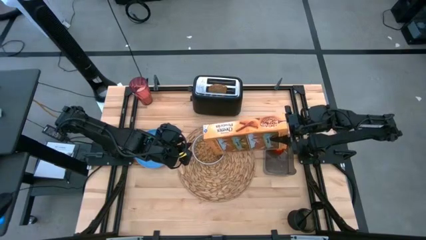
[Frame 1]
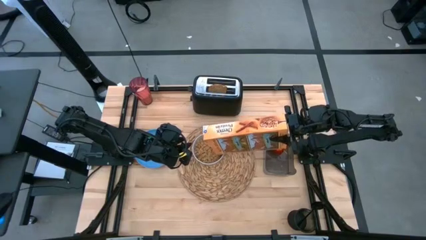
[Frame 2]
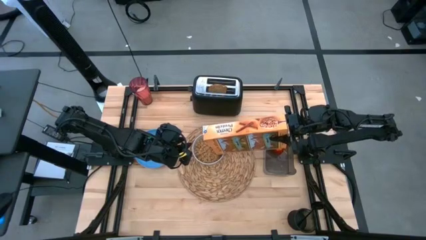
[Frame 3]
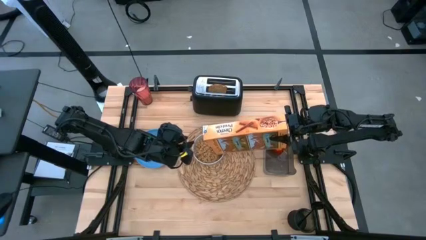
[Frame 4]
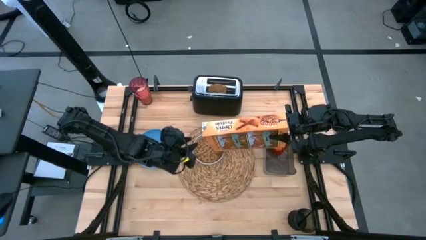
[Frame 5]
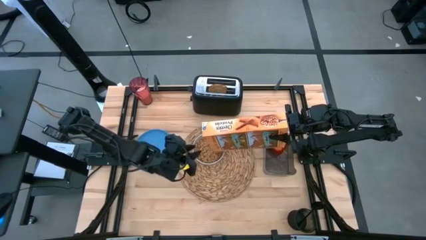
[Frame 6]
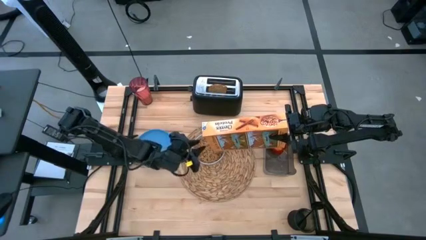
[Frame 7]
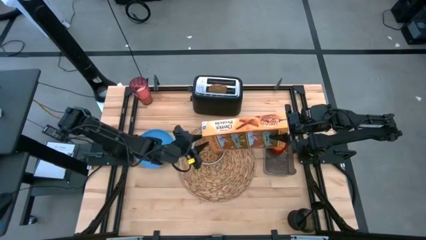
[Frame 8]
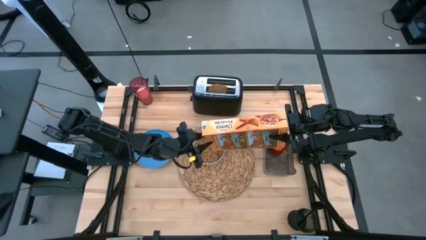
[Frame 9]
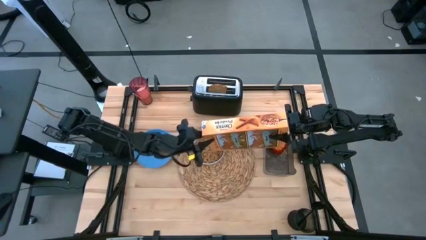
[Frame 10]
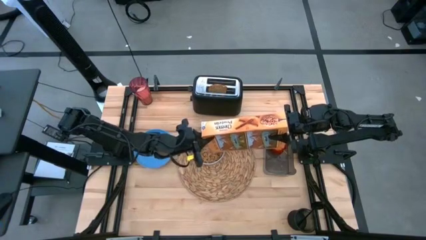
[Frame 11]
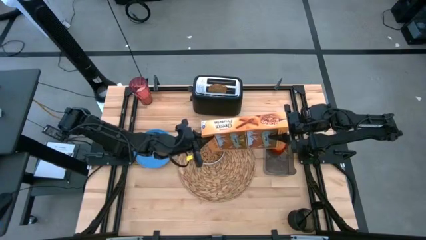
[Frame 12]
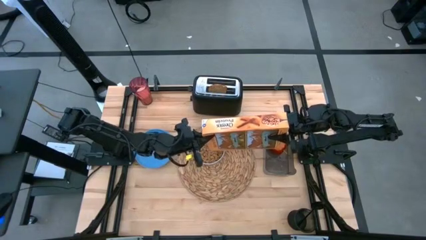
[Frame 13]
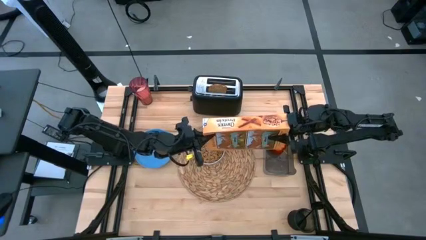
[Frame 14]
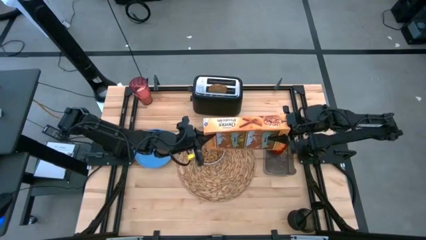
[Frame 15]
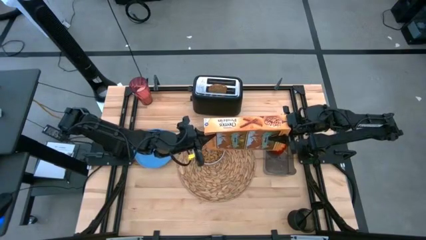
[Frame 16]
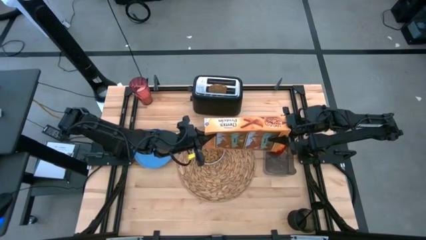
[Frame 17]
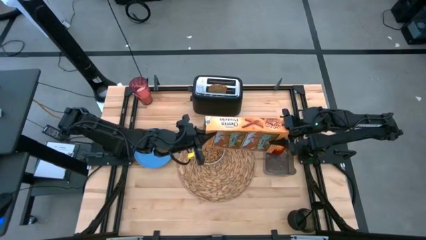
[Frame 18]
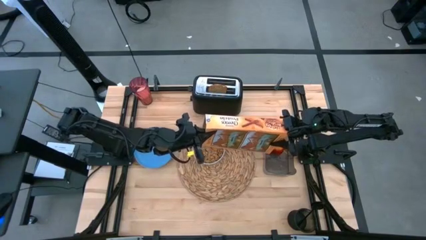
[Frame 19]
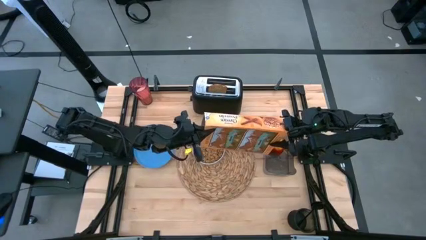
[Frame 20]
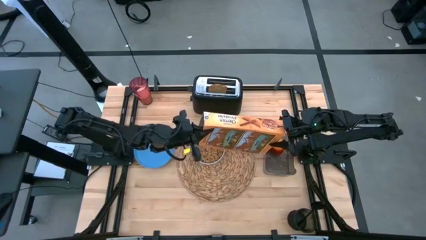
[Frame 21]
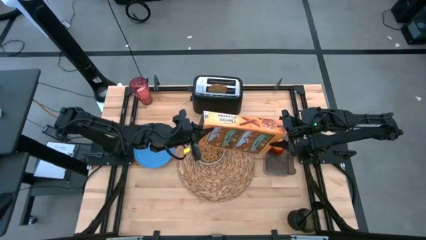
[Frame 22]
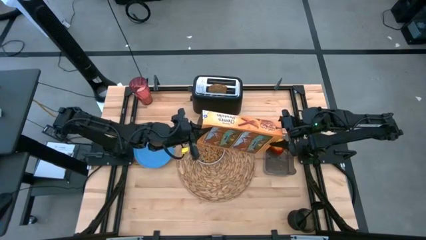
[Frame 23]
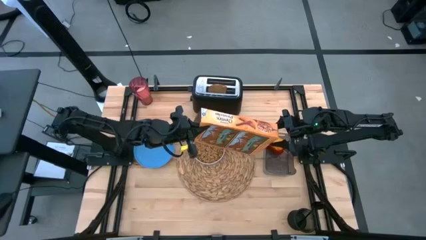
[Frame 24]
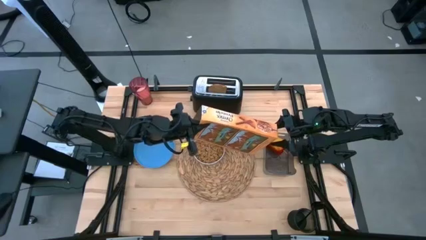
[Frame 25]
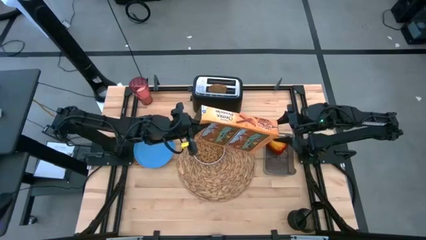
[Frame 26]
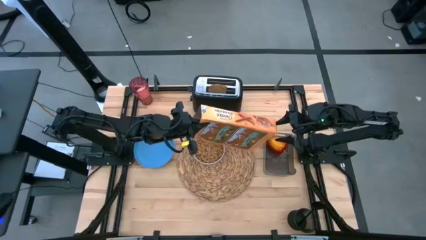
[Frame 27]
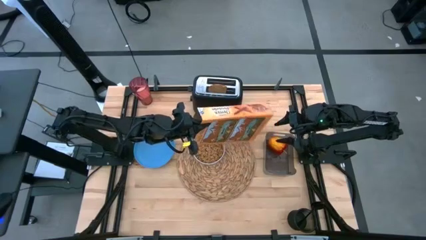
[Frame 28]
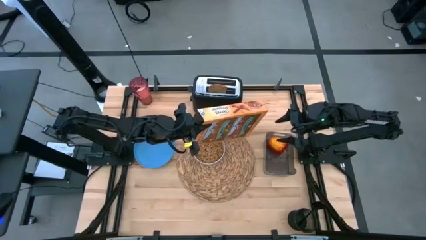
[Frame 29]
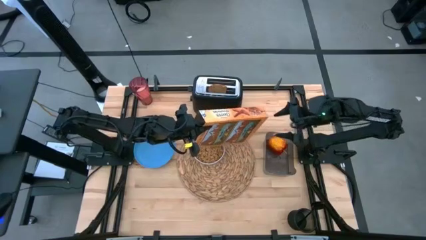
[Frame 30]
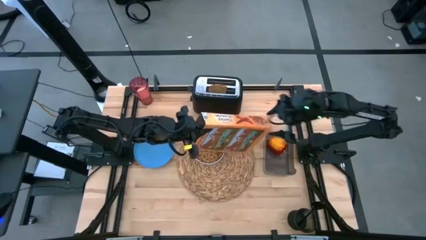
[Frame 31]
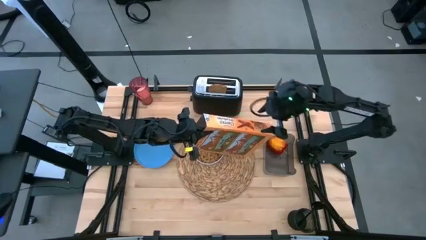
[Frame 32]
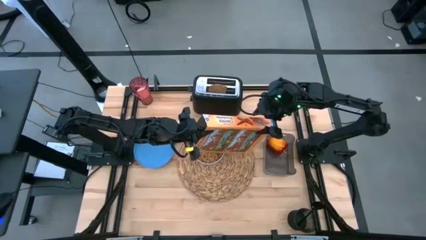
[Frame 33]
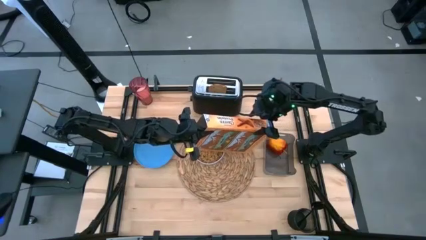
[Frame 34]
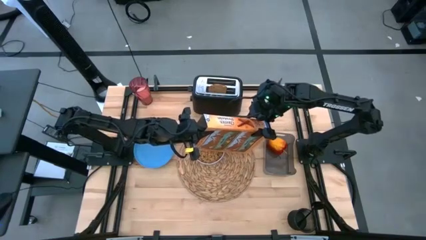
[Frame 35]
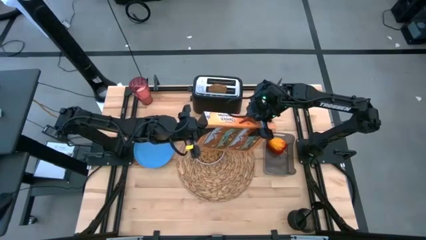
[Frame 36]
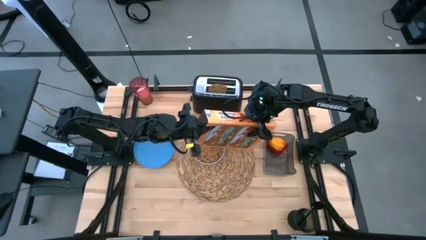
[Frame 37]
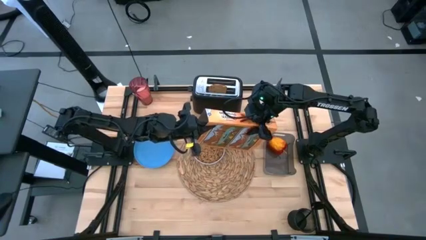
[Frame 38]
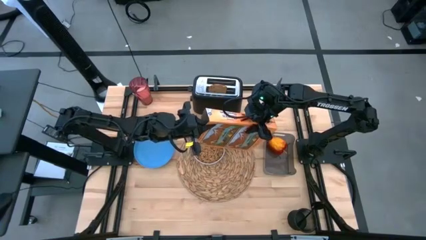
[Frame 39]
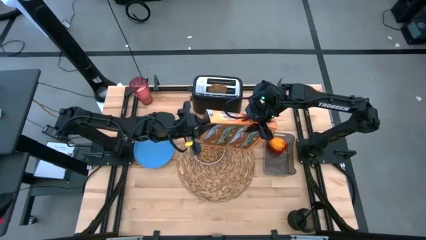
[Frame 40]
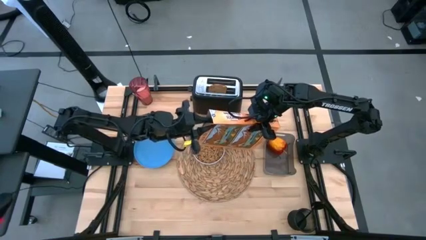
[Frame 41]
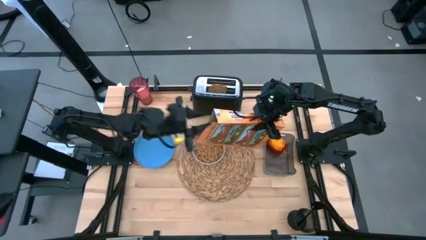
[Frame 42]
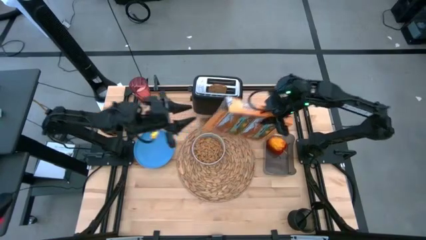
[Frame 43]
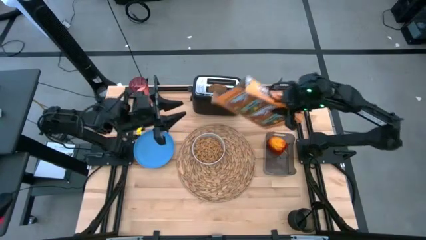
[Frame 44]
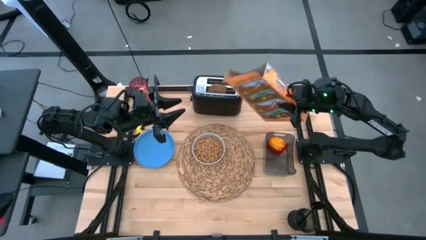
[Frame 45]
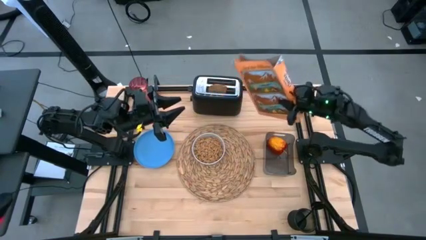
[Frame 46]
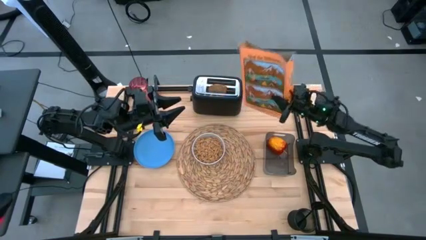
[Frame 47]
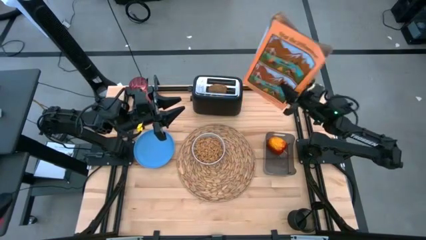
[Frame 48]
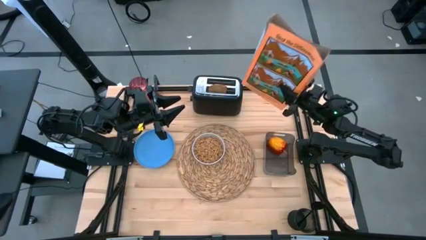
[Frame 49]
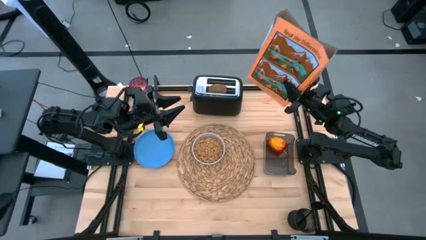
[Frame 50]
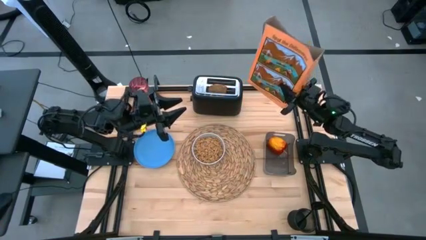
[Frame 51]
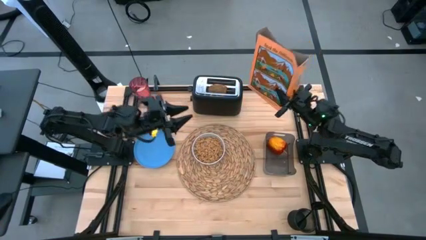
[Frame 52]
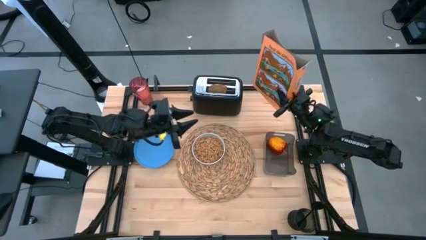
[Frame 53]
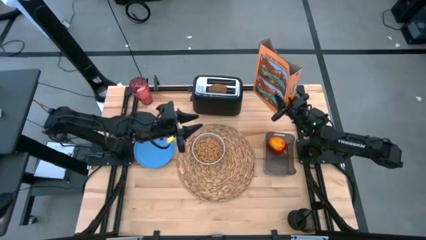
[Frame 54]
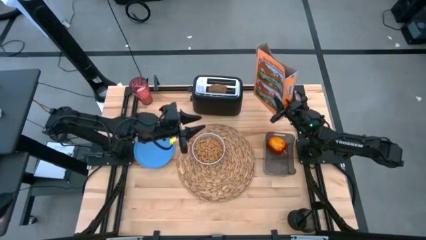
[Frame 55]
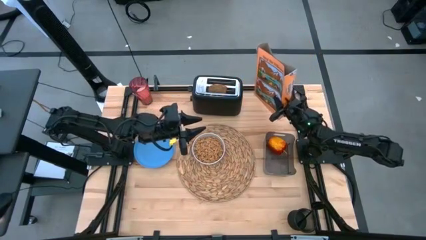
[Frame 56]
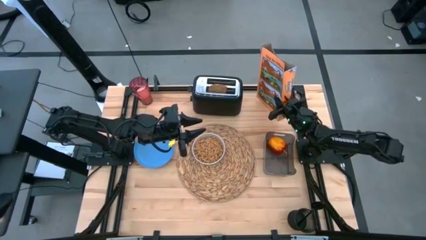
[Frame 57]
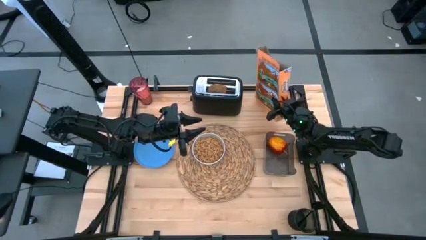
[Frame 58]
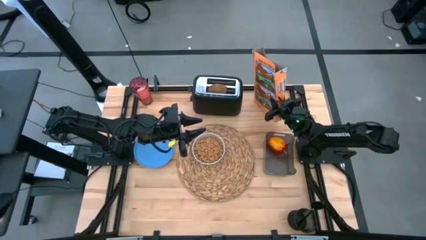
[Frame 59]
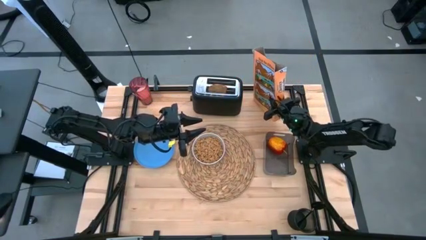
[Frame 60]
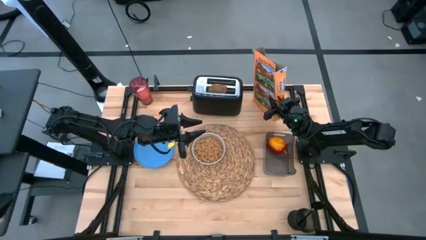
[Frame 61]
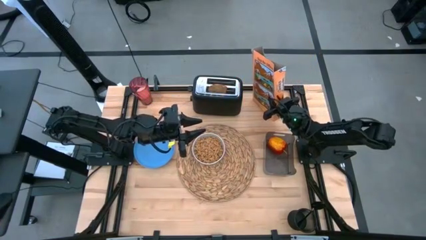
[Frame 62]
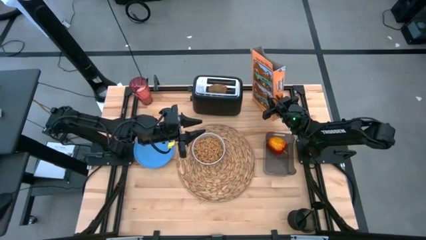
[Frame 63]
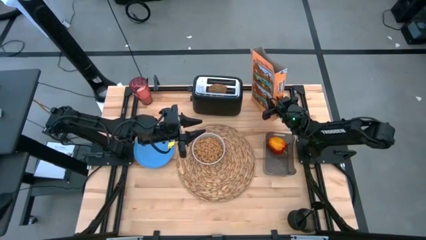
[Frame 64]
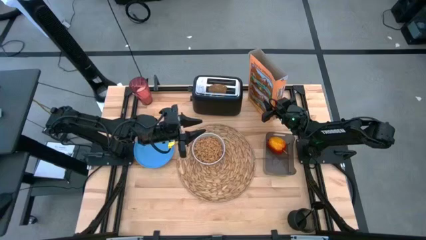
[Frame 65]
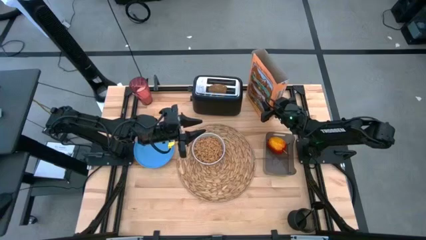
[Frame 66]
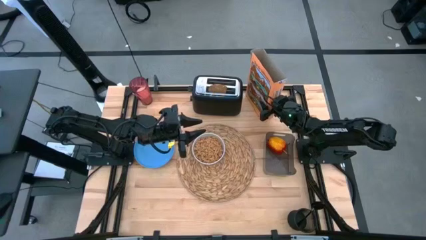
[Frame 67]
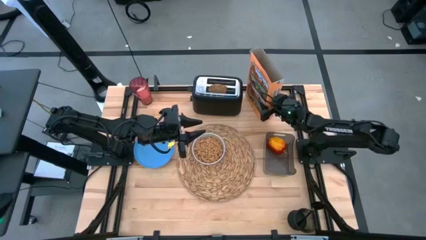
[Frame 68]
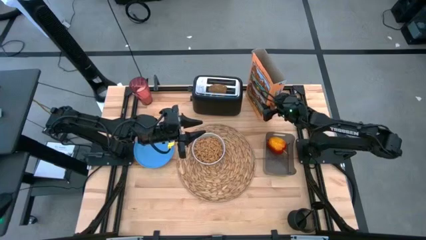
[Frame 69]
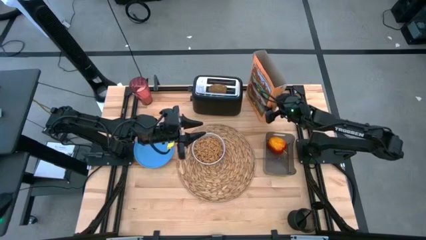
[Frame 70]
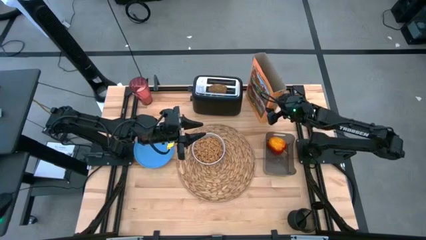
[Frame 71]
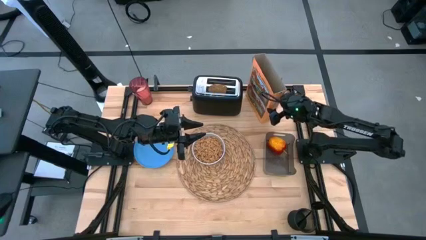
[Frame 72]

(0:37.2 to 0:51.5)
Task: Arrange a breakfast setting
Pour the cereal from the cereal box into the bowl

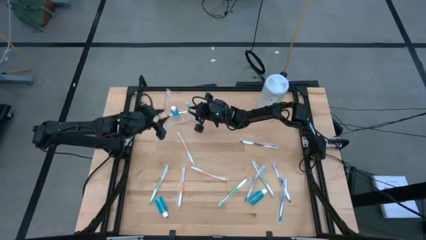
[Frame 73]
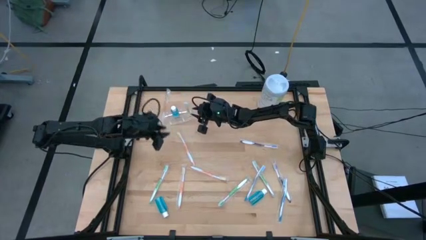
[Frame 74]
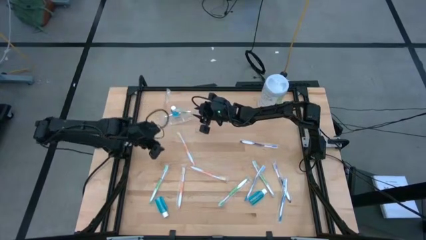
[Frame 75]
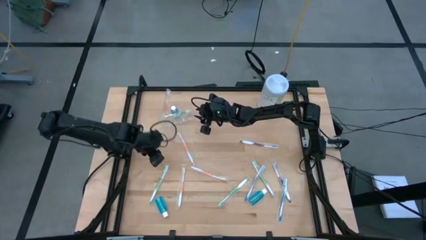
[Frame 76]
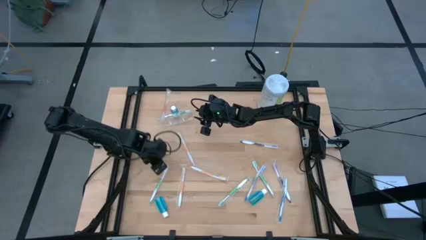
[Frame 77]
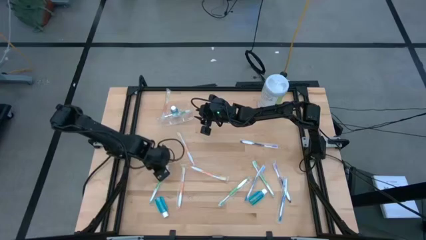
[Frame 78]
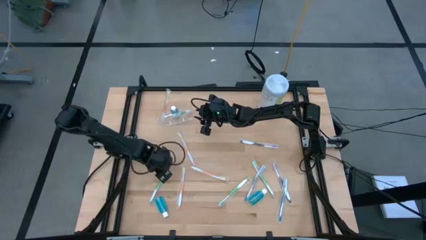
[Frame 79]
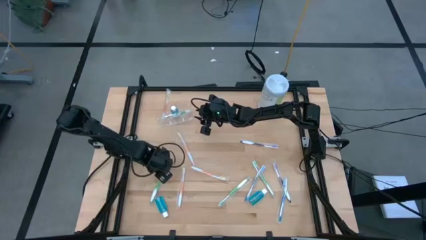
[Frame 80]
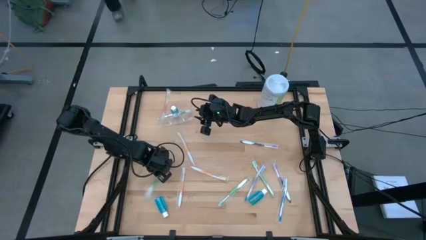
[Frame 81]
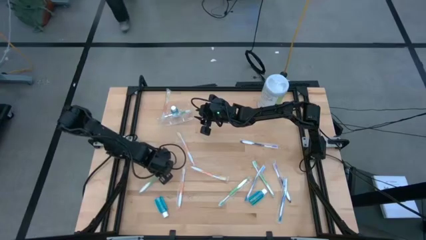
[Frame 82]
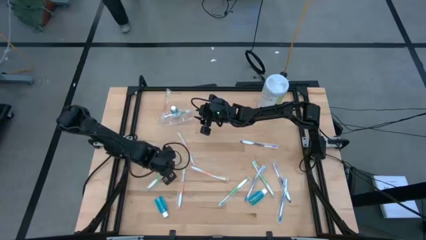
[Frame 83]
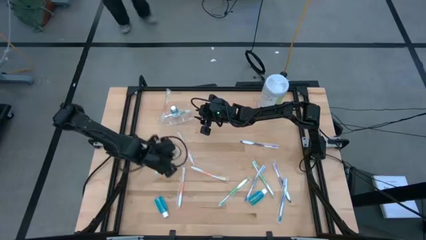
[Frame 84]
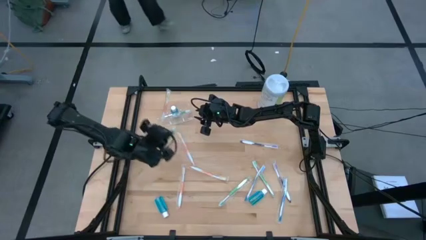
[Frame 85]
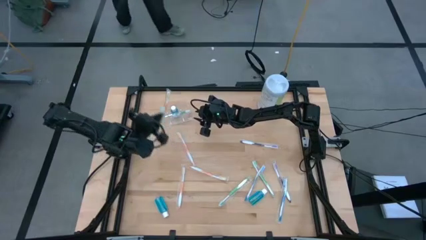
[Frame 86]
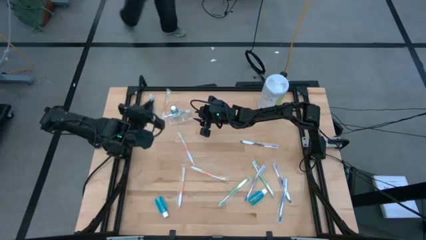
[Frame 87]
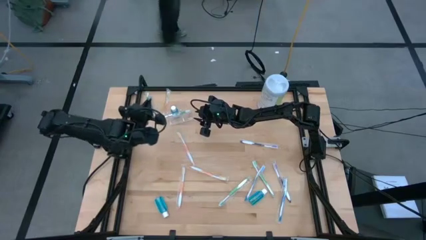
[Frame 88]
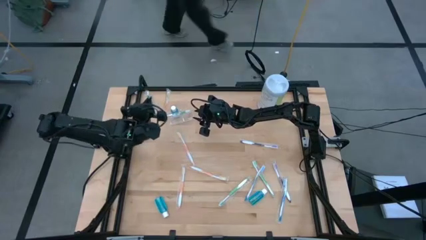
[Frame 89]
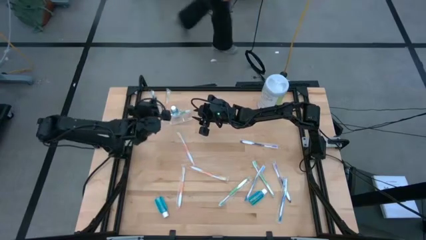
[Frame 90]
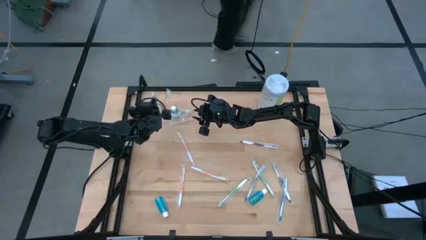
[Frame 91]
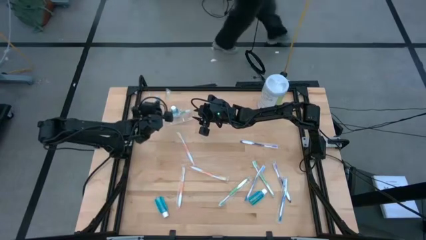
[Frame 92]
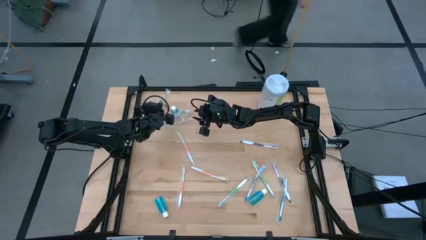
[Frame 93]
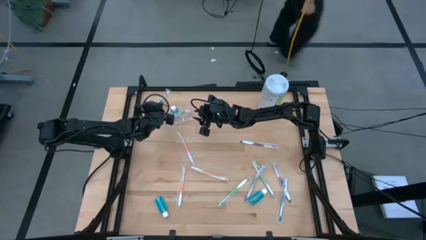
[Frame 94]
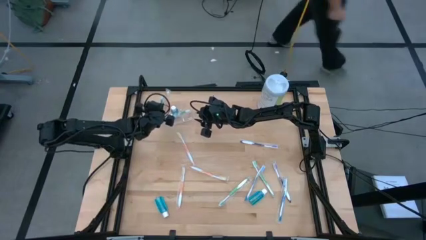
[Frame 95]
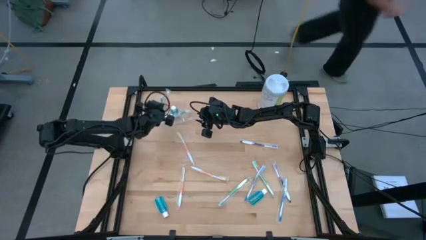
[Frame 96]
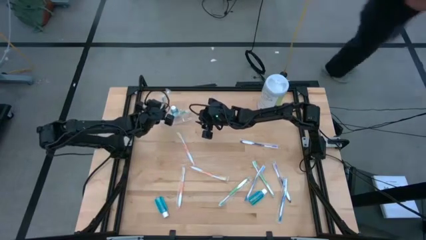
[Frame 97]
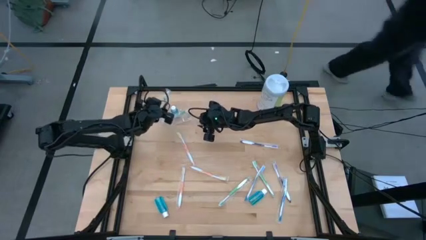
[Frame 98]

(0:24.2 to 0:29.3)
Task: Pick & Place toothbrushing station
Put the green toothbrush into the transparent organizer
